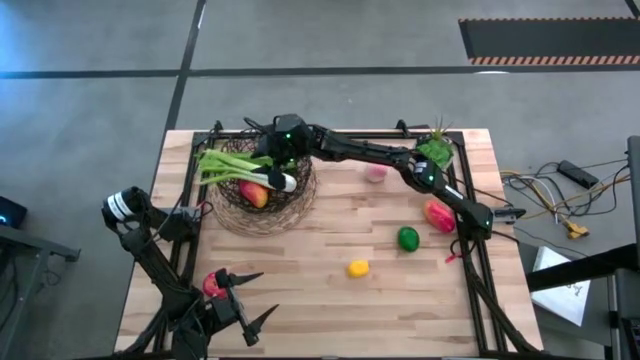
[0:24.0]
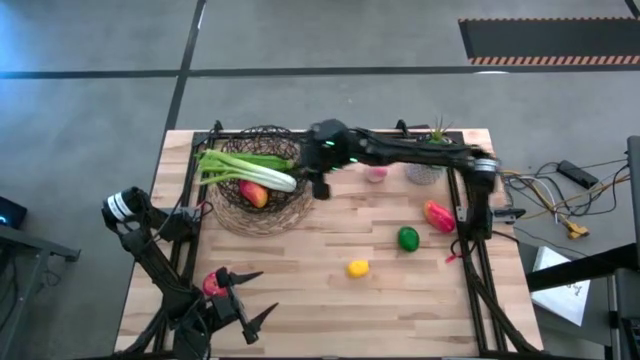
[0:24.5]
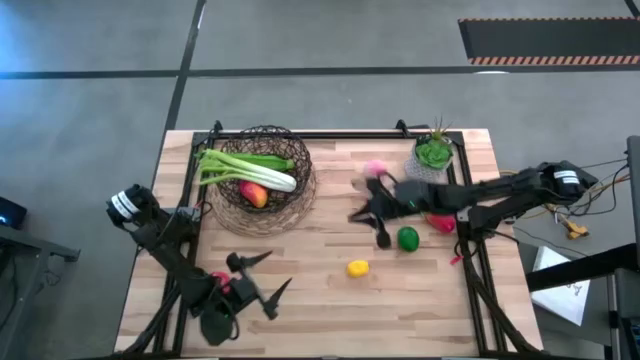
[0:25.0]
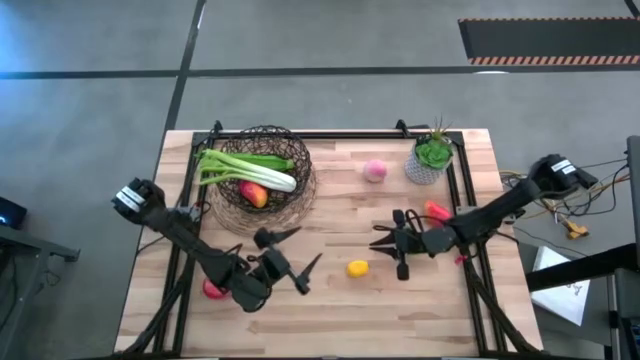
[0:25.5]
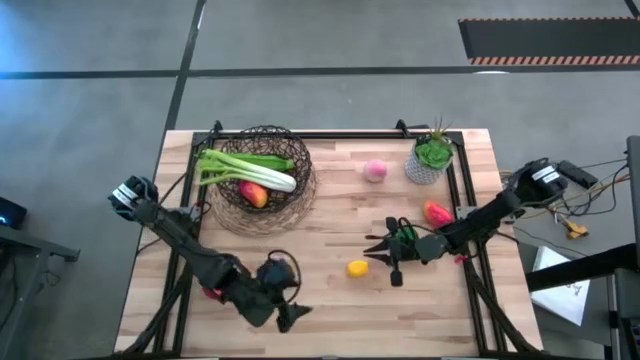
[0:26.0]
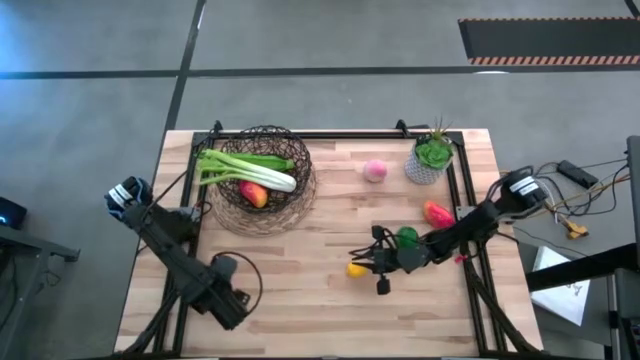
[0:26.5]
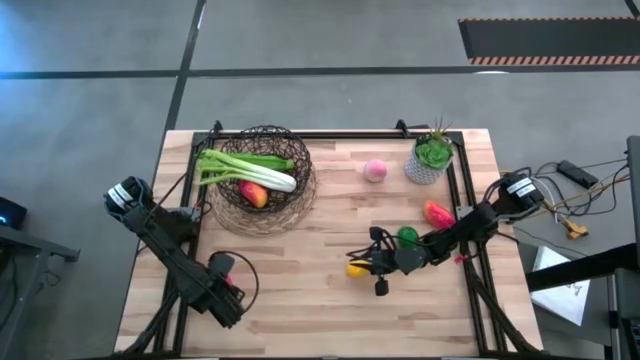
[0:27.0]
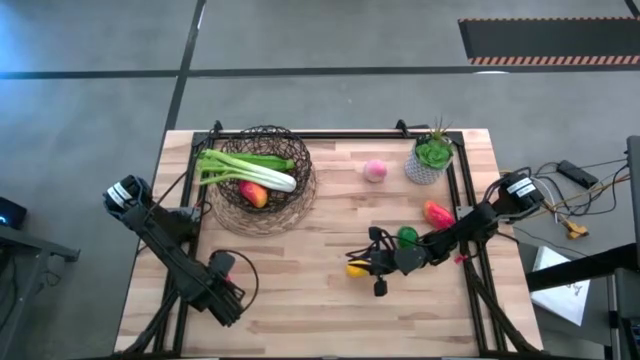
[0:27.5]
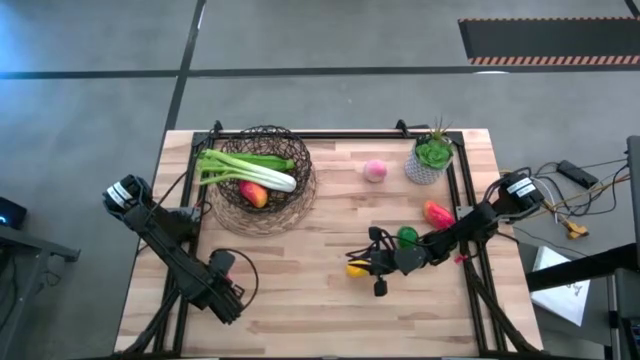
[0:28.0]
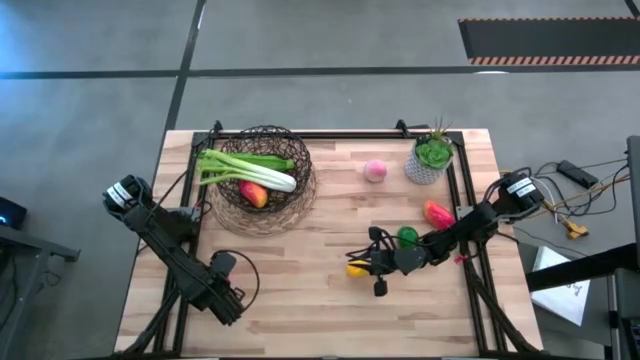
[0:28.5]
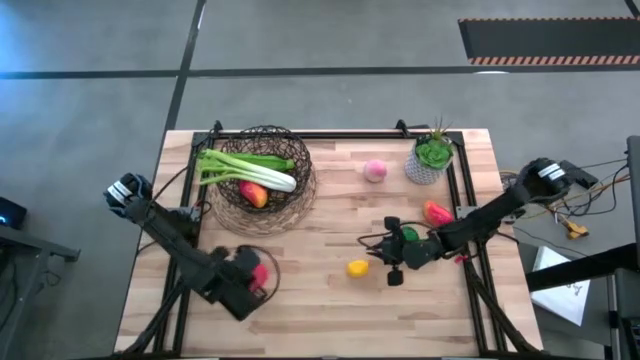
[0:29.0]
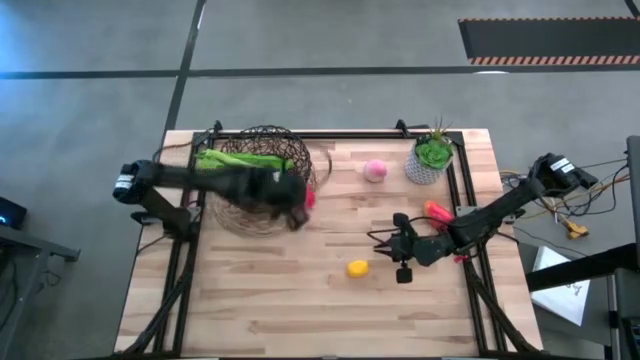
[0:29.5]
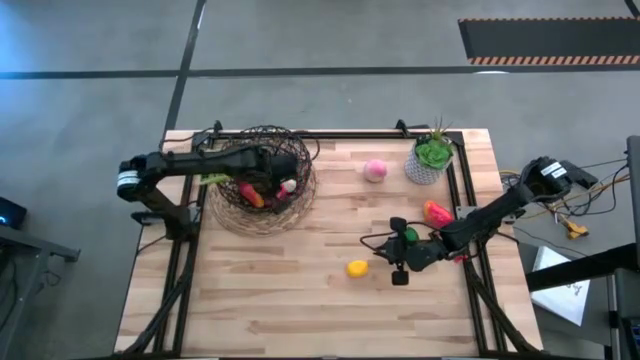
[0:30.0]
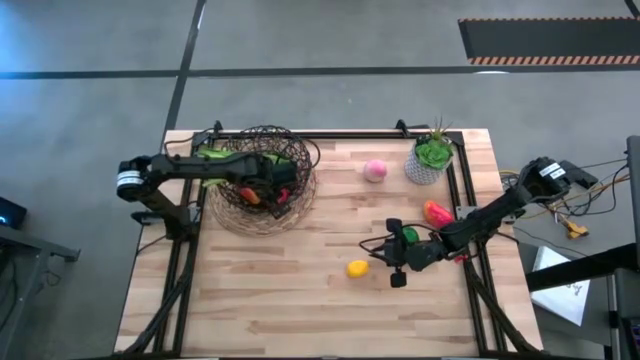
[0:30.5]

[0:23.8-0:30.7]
Task: Build produce basket
Put the red apple into the black mesh basket

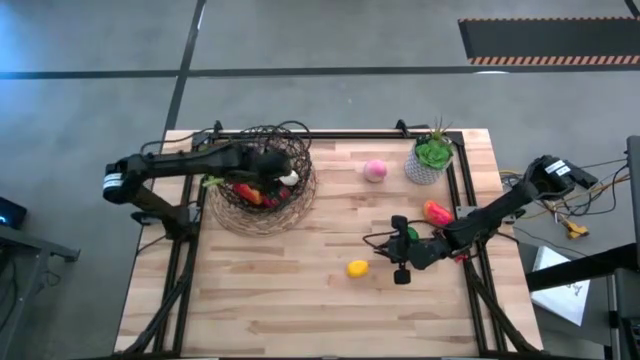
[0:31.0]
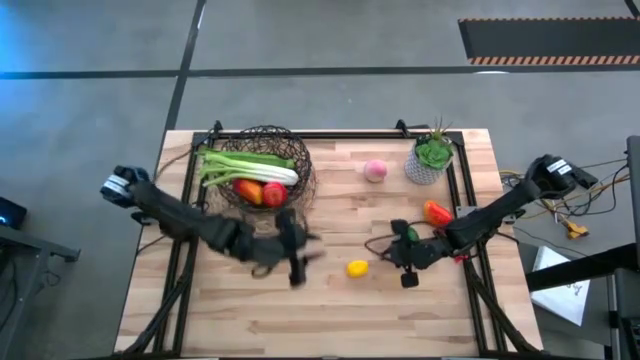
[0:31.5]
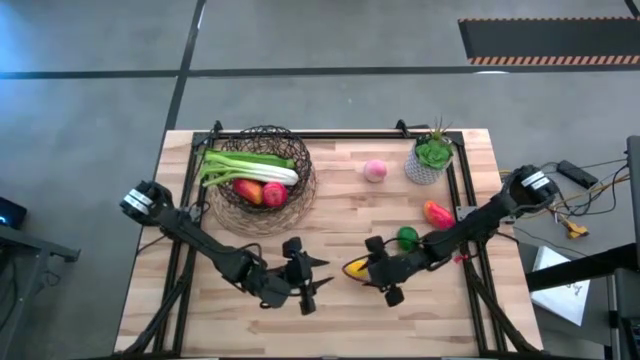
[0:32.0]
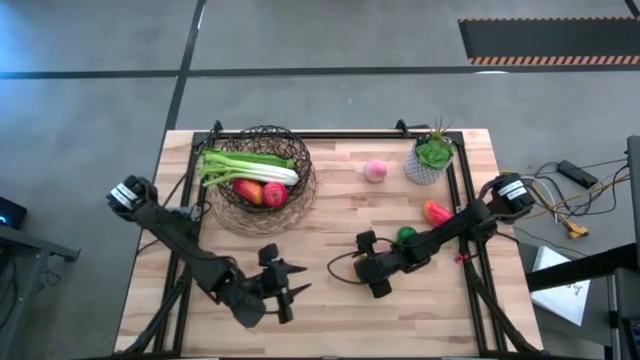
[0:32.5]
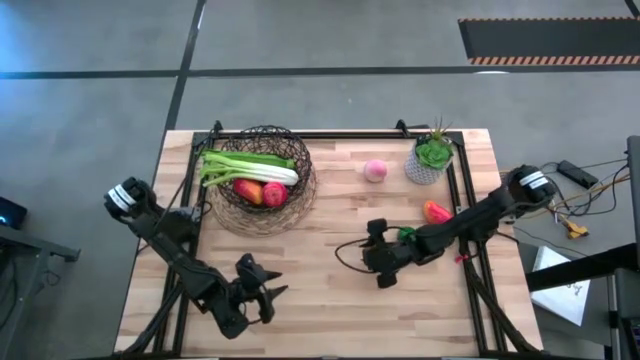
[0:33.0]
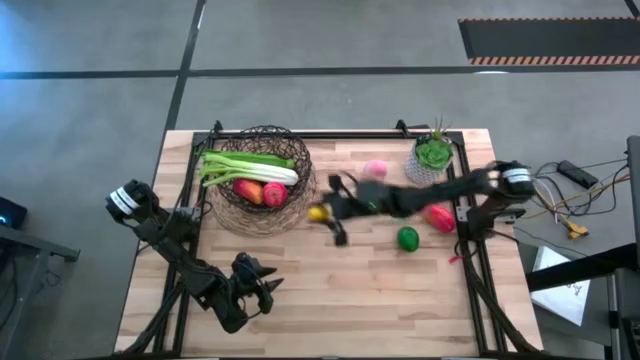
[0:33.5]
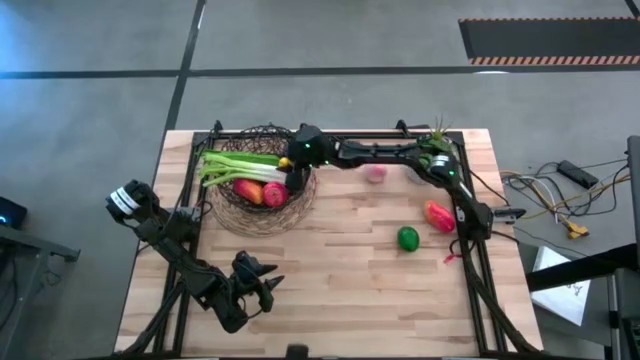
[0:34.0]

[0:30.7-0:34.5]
Put the yellow lemon into the black mesh basket

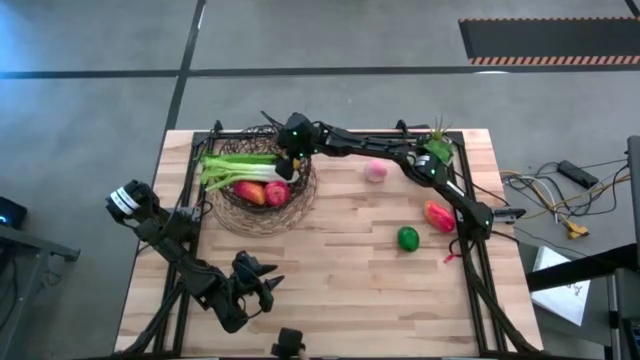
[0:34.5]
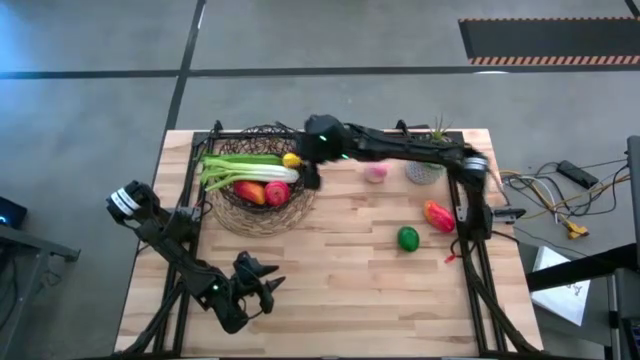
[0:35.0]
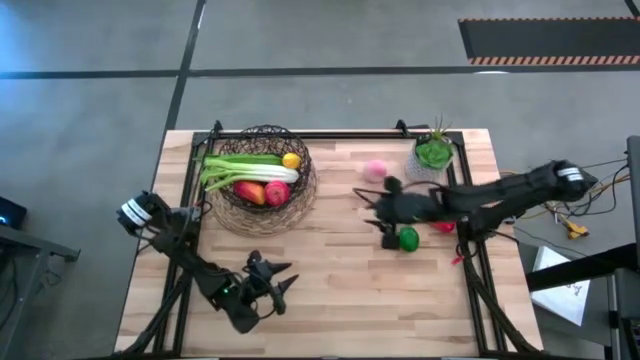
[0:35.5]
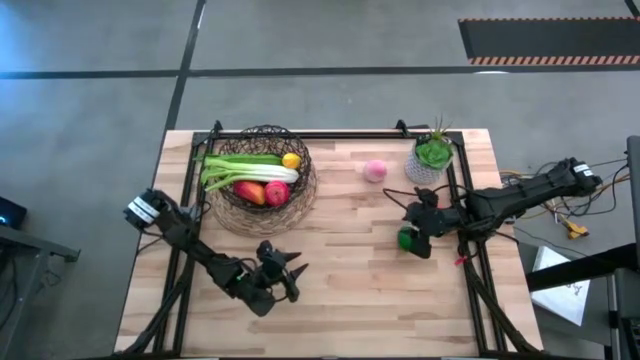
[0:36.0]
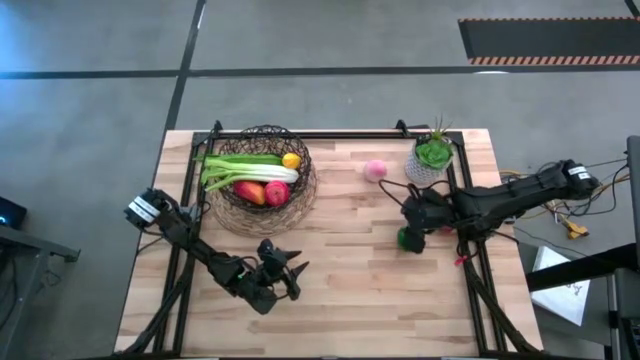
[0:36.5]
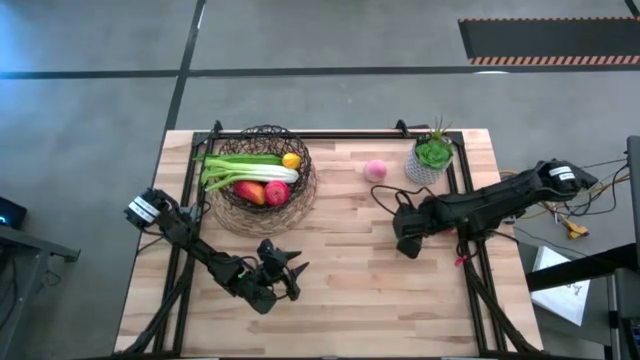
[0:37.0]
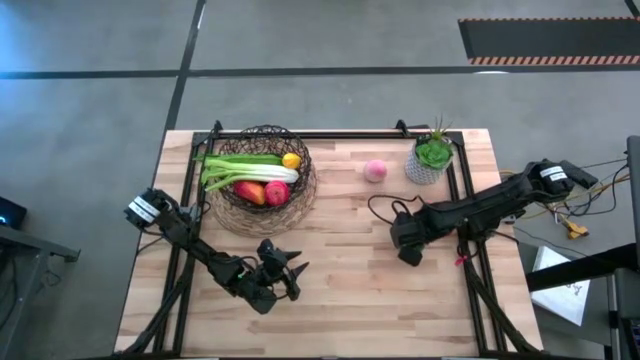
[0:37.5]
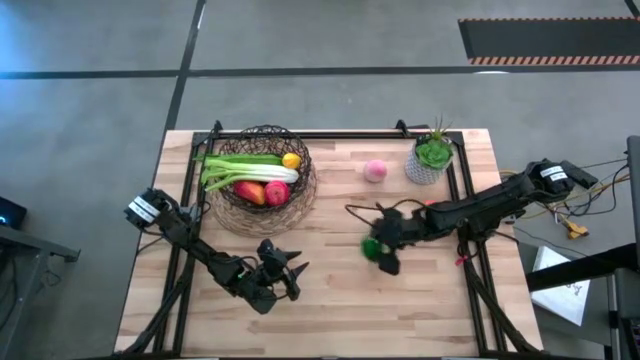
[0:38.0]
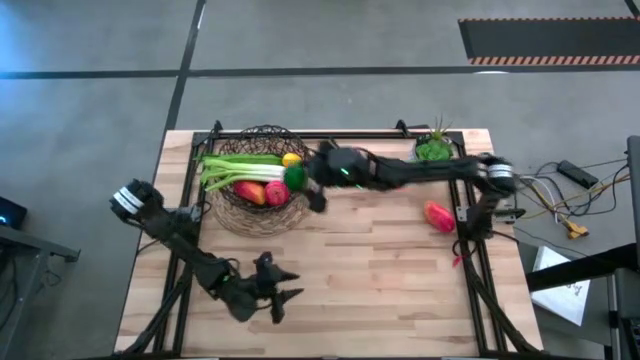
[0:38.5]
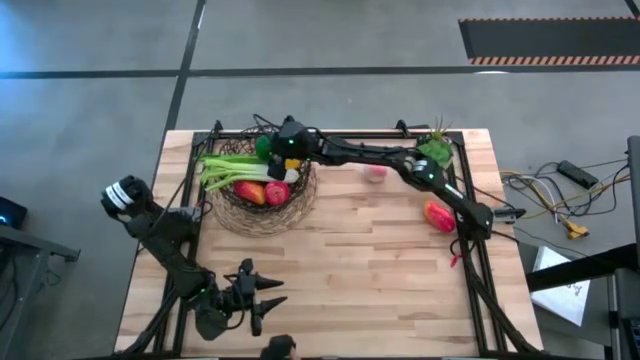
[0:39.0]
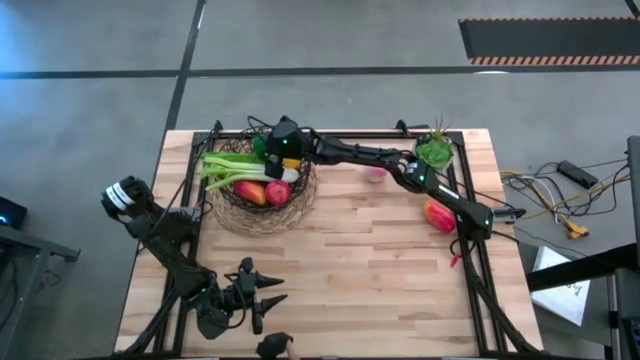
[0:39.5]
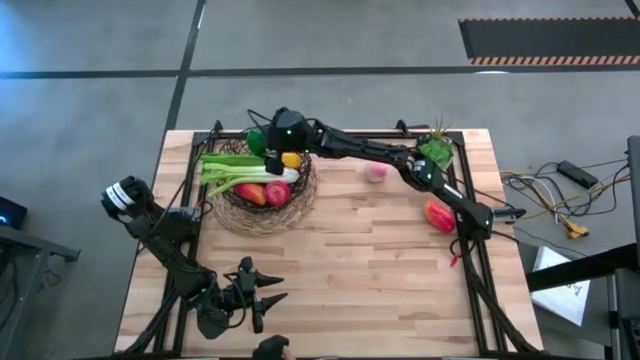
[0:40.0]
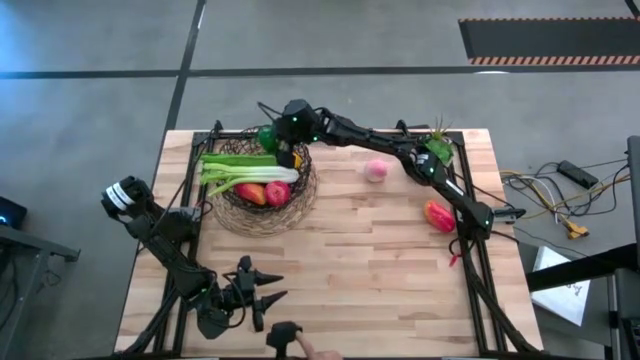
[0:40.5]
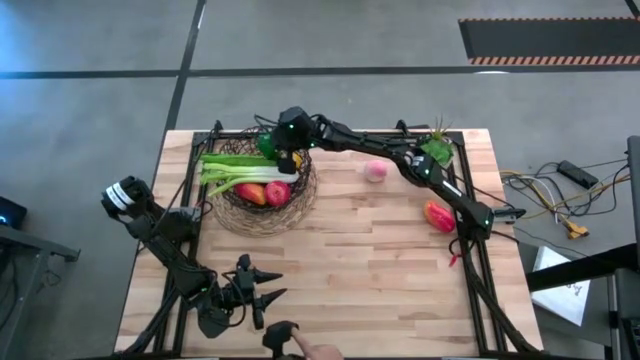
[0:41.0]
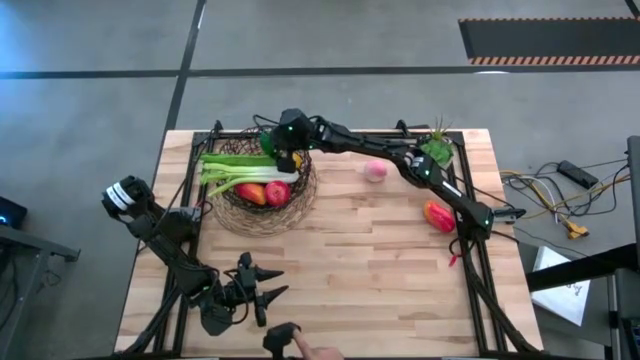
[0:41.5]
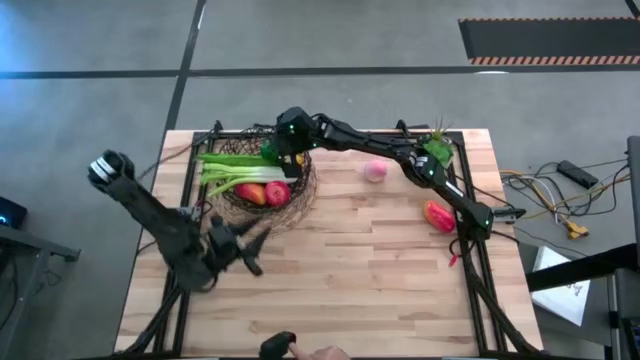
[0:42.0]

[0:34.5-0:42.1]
Put the green lime into the black mesh basket

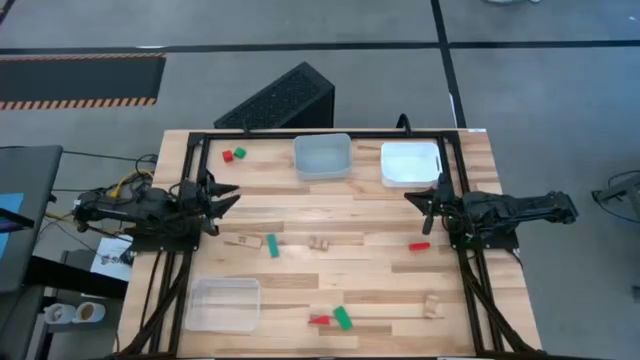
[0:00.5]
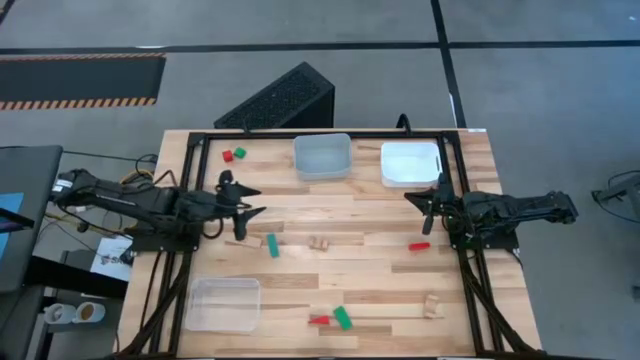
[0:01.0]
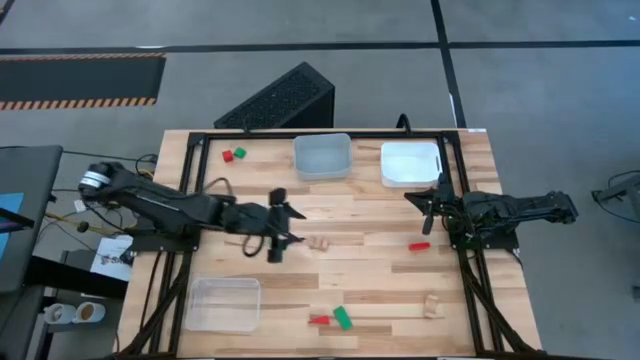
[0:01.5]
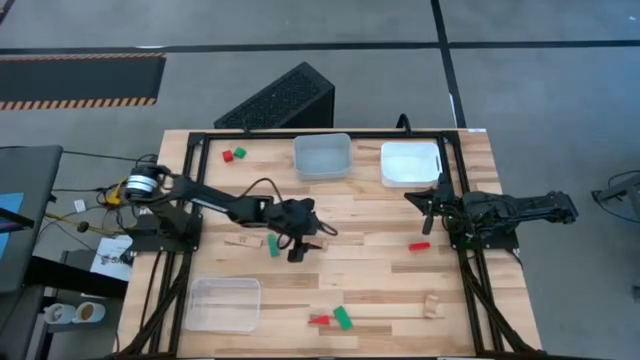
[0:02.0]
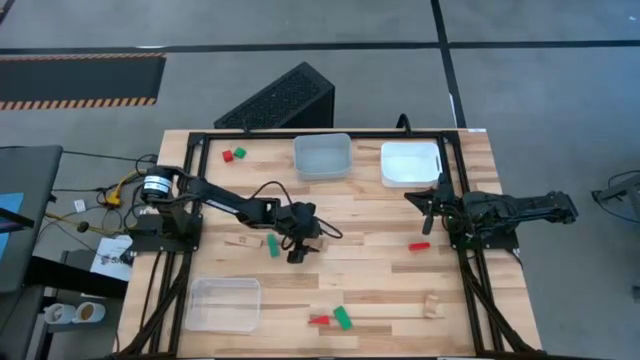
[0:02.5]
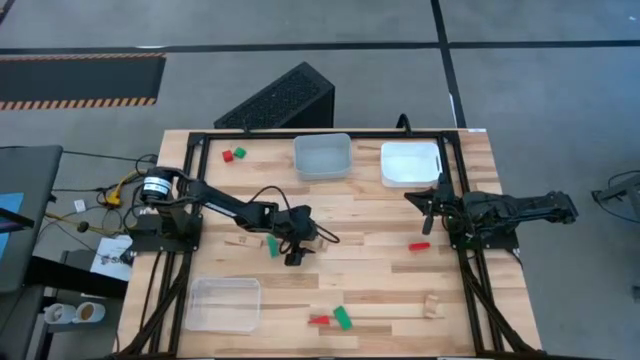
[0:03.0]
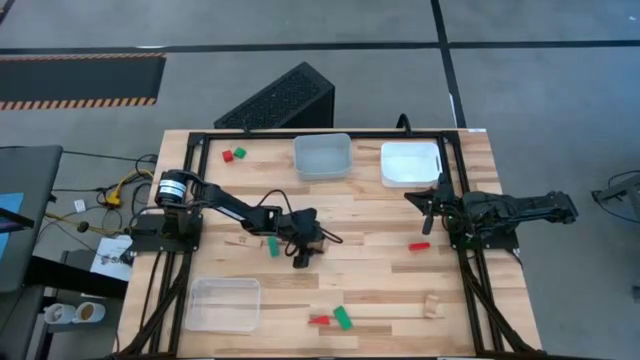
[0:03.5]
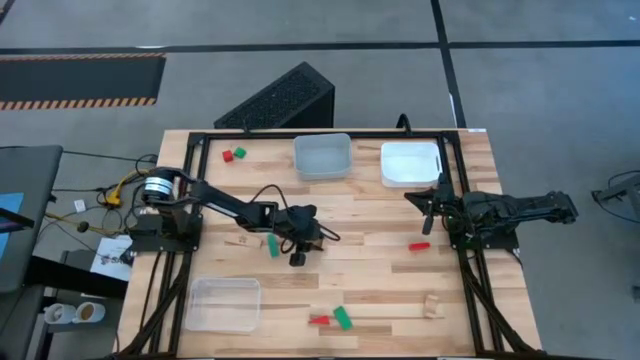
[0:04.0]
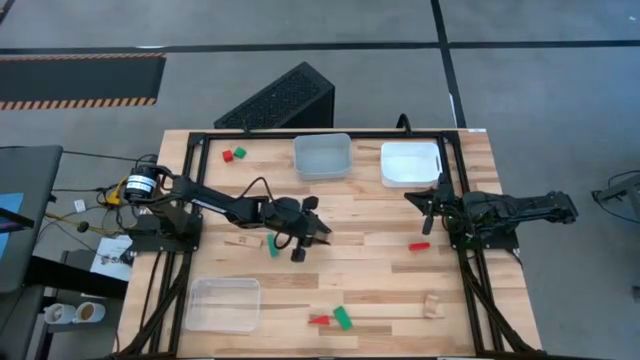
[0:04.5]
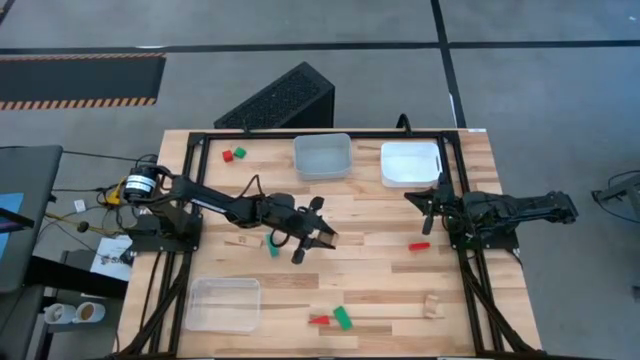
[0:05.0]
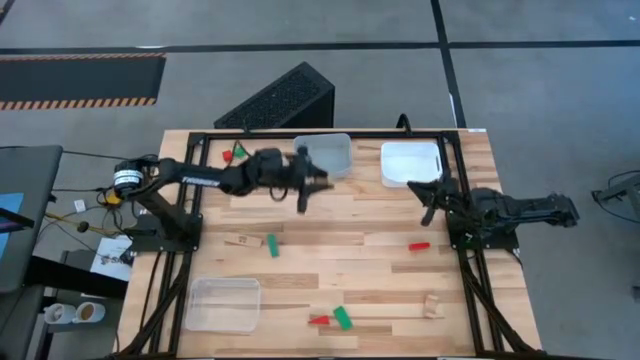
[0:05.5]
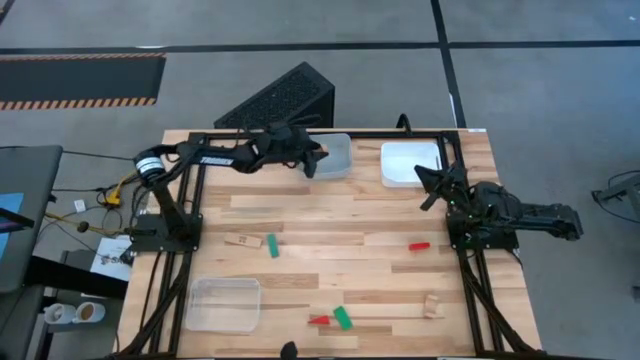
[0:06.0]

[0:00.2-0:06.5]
Task: Sort & place blocks by color
Put the top right brown block into the gray bin
